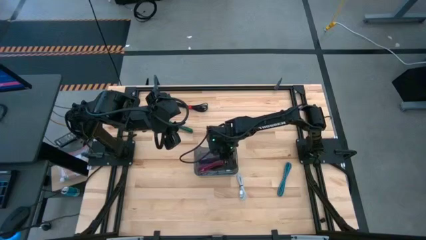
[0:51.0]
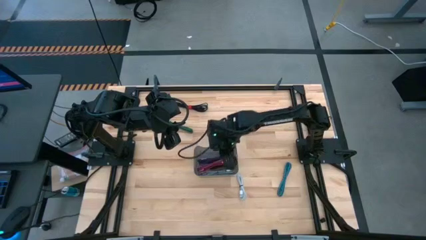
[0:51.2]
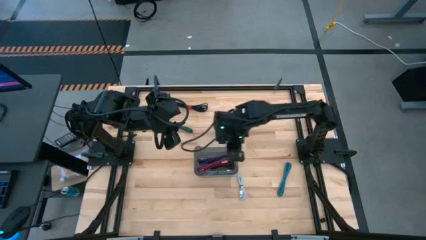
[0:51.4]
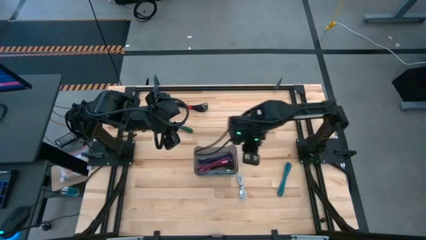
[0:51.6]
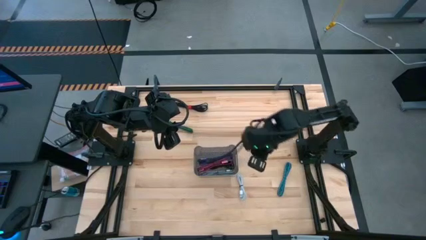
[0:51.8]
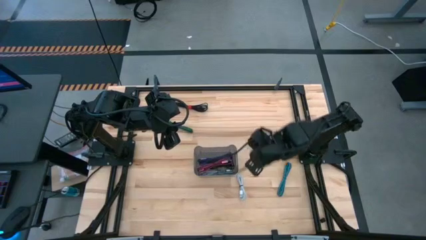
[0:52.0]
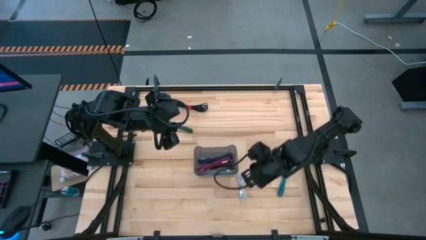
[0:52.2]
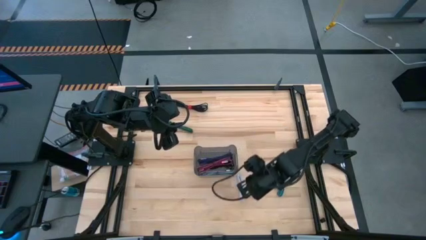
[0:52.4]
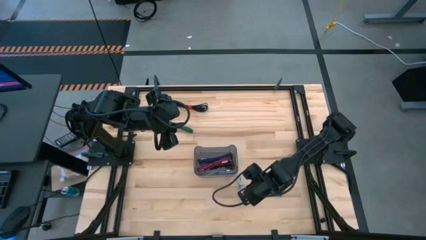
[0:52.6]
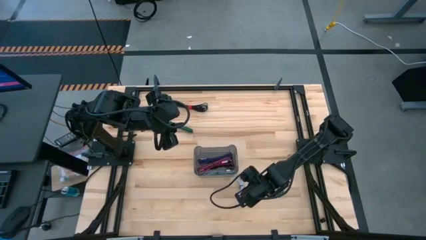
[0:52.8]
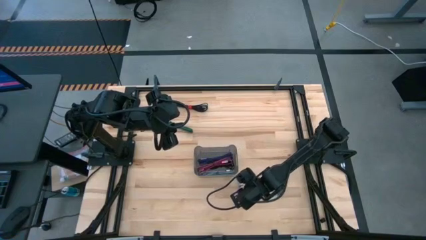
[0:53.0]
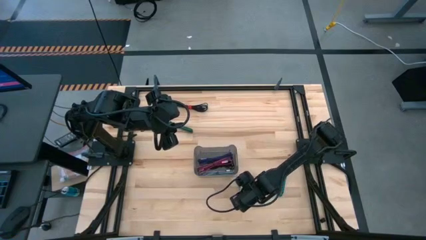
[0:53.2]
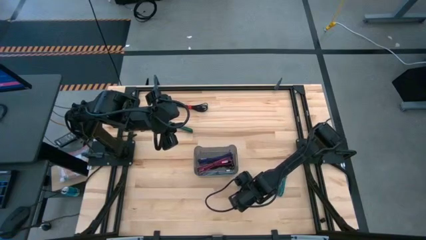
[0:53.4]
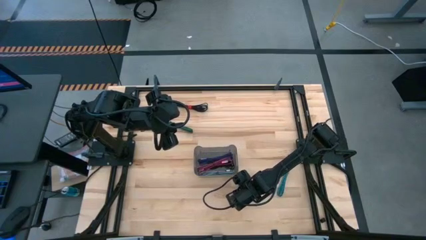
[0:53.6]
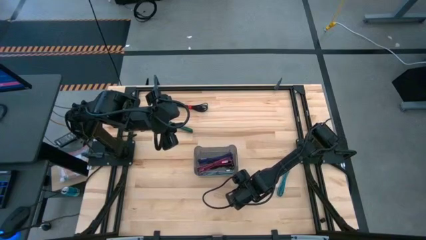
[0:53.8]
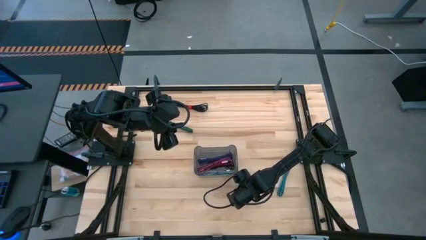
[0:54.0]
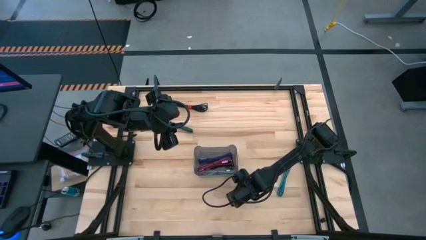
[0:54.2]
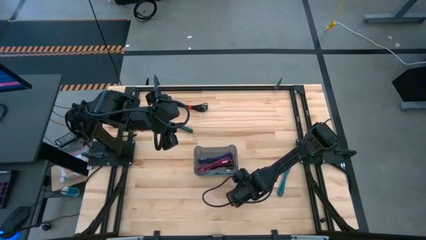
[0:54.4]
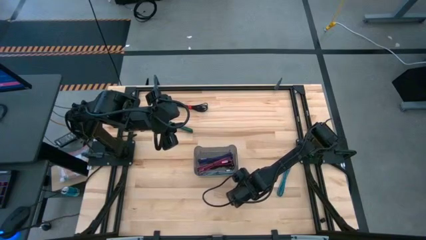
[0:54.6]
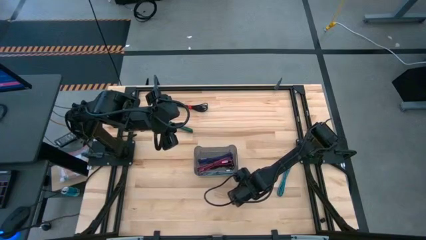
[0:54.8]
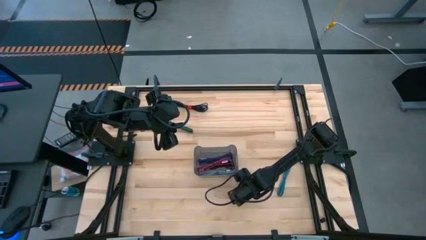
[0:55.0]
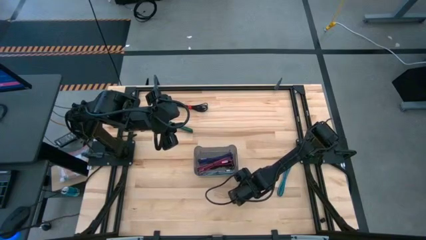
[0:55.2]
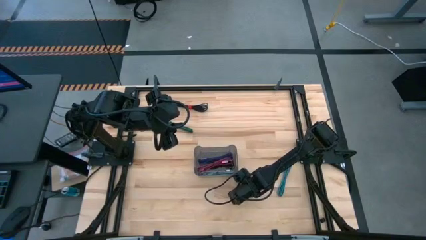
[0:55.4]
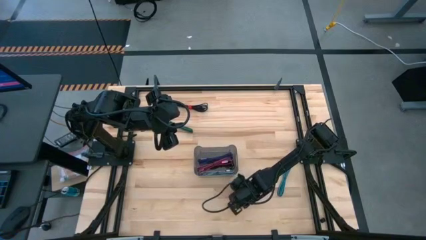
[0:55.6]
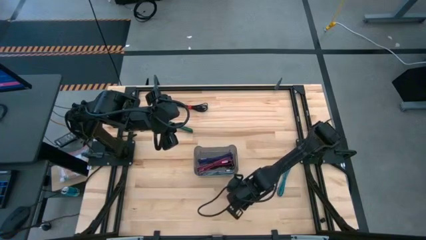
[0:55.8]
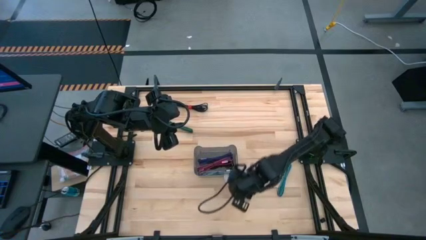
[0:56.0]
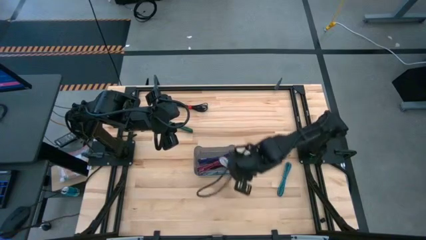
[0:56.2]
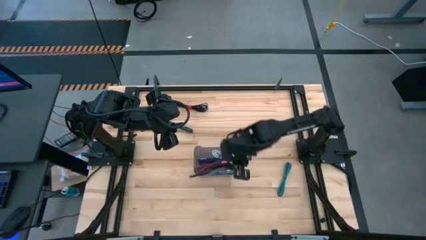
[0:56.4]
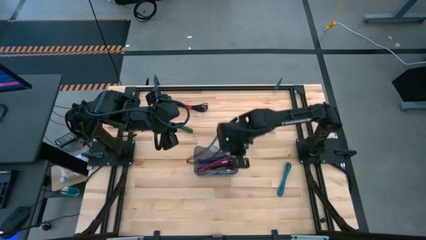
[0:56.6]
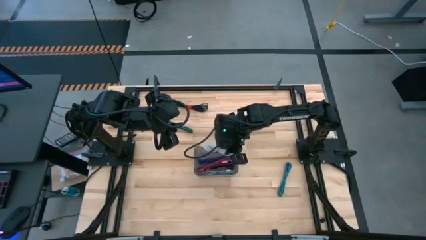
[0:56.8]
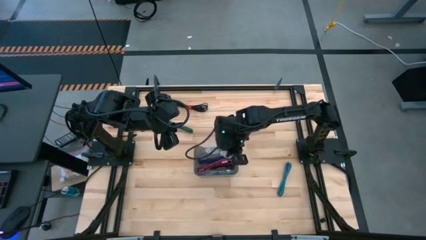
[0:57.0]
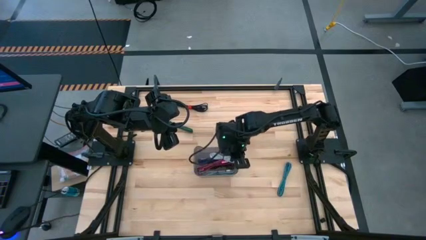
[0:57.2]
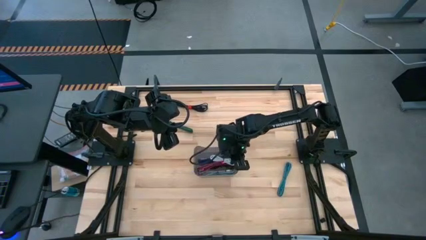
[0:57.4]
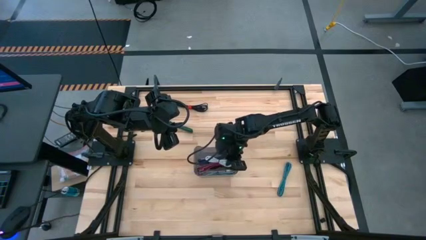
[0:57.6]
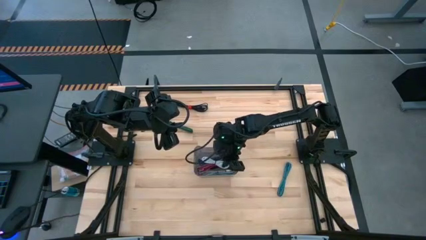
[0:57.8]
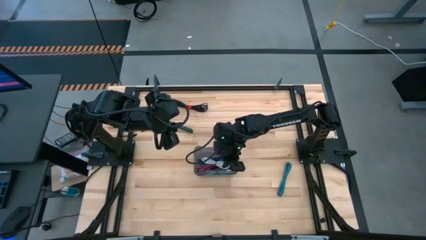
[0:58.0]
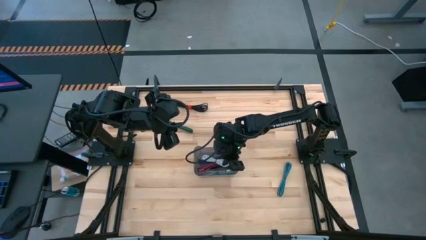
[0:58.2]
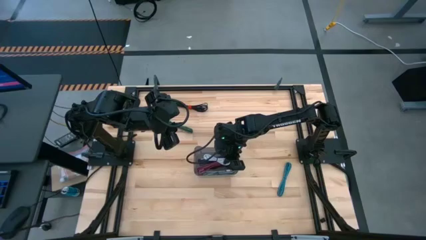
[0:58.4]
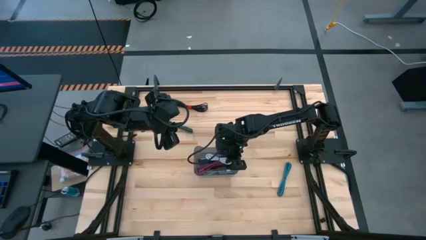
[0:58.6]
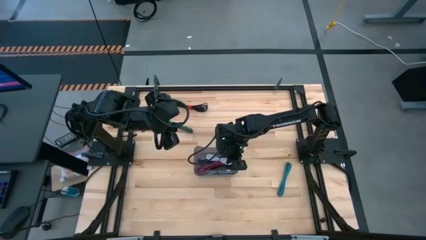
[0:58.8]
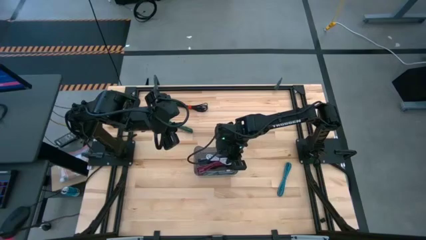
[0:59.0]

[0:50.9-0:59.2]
Task: Pick and place USB-C Cables
Put the white charger cable into the black bin

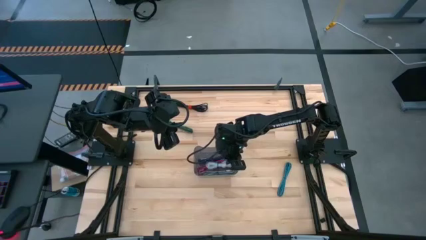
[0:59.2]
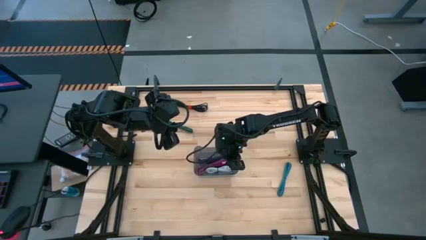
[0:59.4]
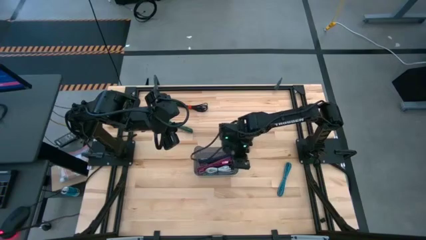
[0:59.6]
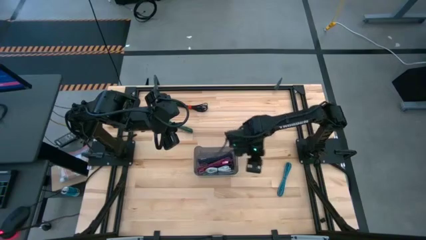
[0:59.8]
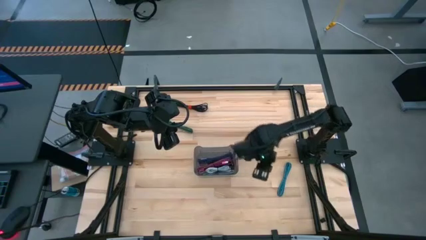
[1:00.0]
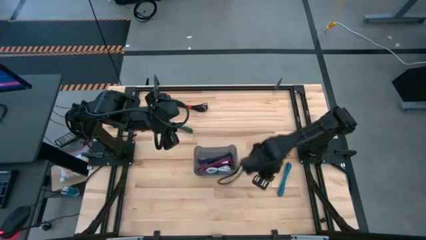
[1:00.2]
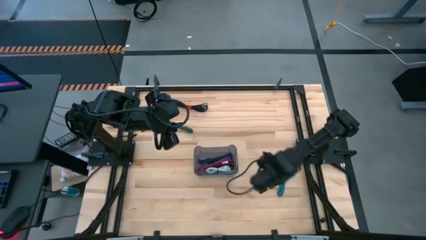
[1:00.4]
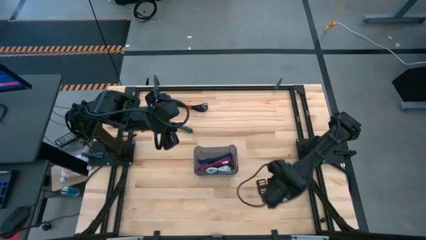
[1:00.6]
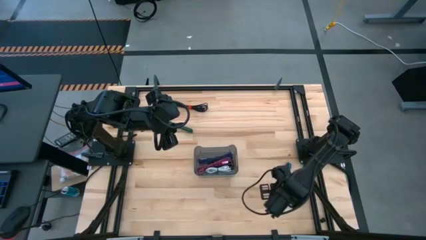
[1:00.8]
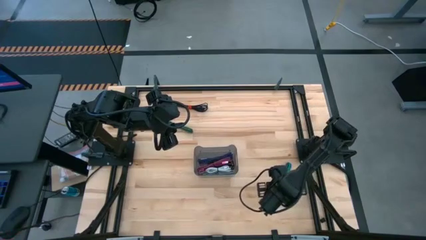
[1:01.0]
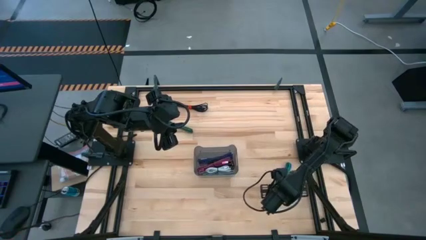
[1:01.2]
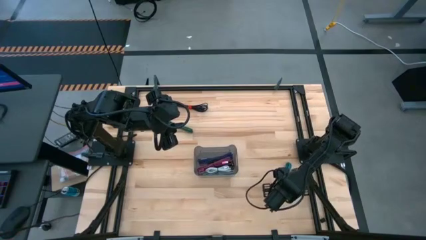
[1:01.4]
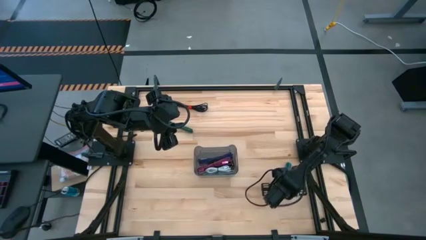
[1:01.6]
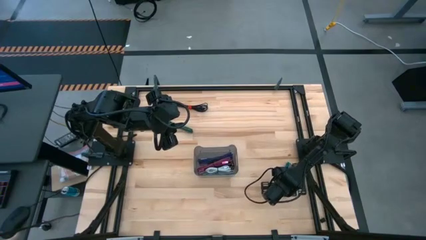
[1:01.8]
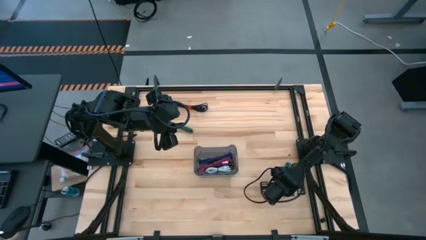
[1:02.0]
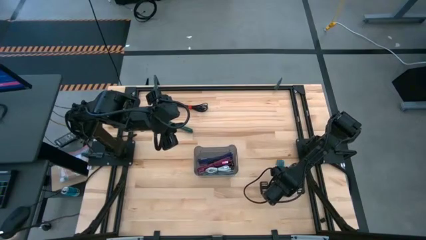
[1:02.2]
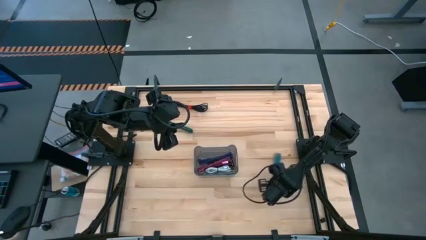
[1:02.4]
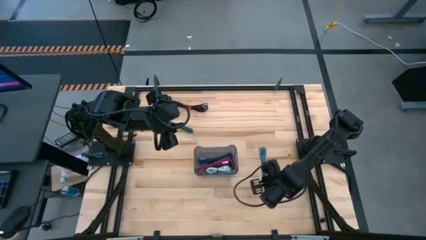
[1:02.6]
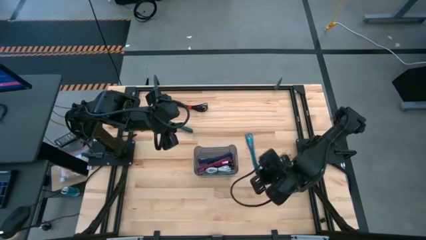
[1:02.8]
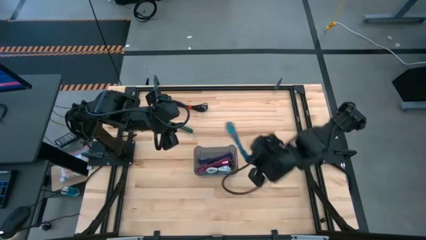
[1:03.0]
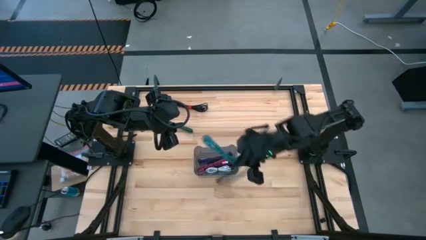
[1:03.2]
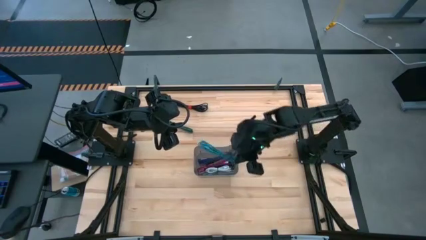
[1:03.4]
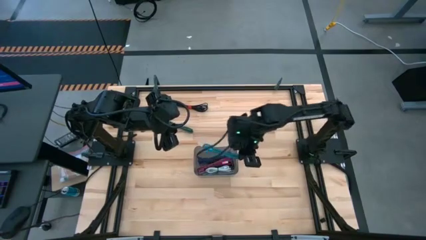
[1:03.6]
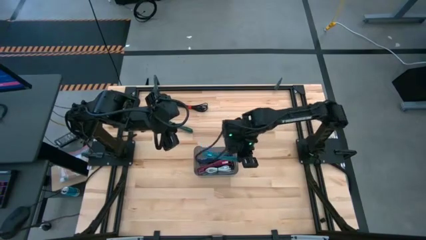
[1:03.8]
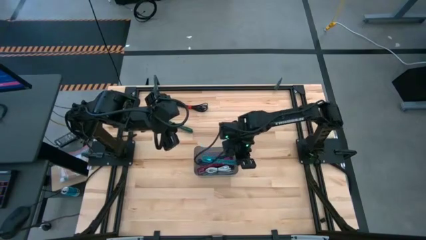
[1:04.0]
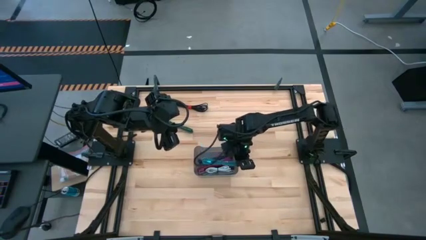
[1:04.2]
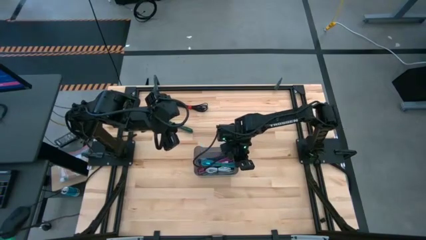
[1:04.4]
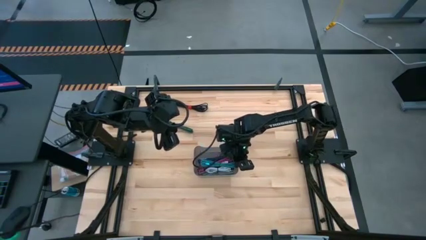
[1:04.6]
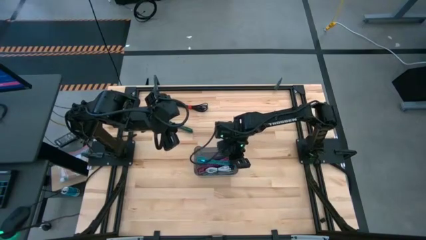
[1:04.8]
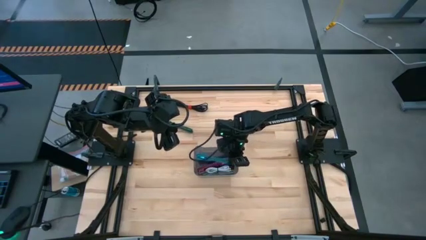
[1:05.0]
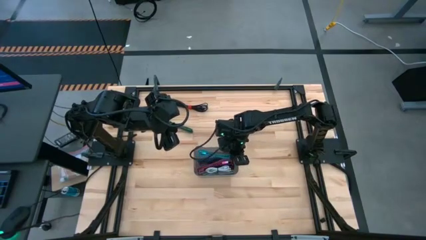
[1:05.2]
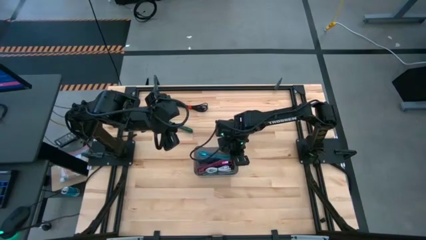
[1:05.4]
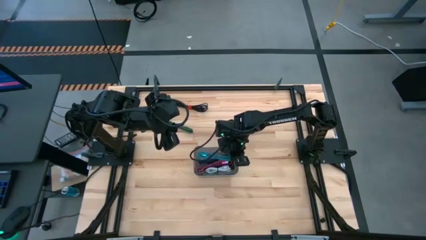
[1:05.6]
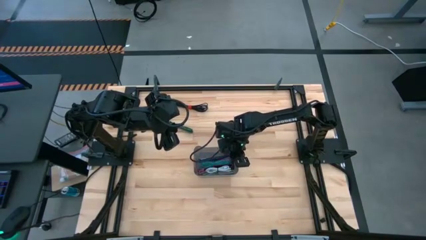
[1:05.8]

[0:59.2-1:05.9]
Put the blue charger cable into the black bin

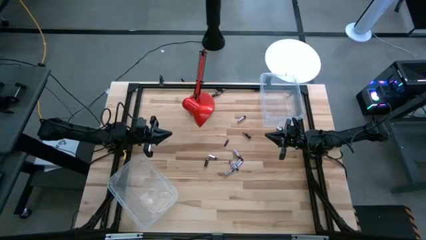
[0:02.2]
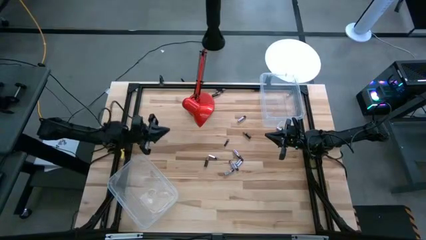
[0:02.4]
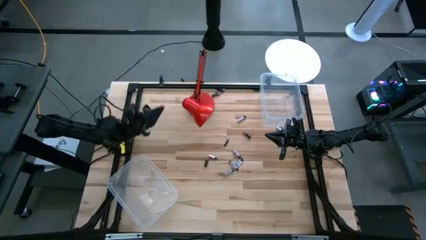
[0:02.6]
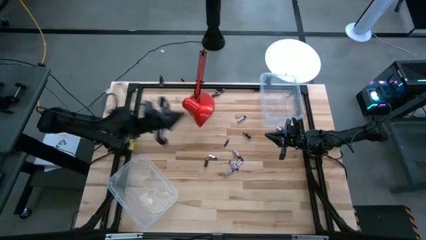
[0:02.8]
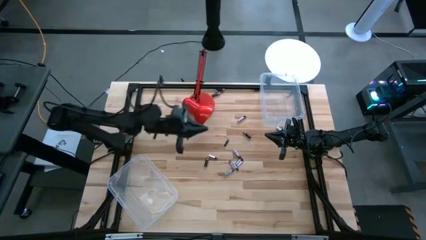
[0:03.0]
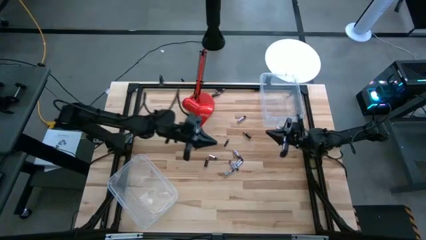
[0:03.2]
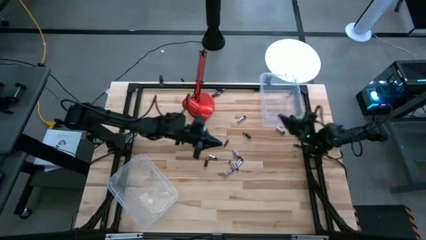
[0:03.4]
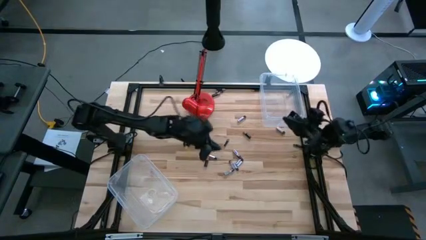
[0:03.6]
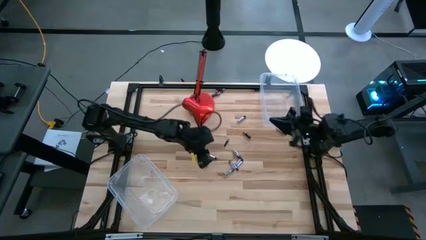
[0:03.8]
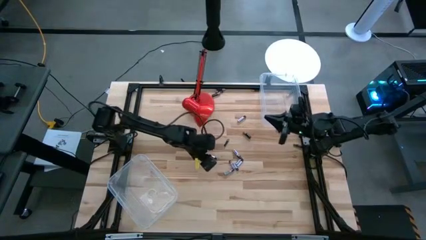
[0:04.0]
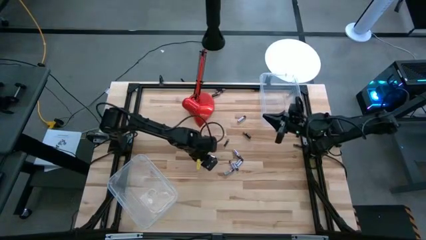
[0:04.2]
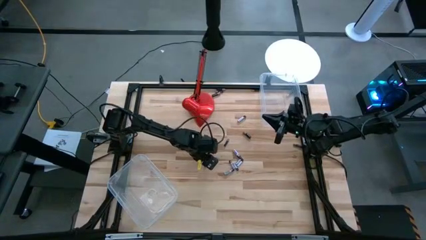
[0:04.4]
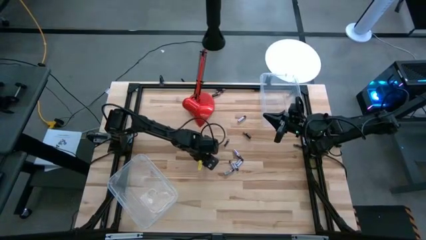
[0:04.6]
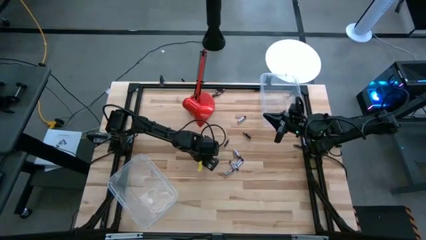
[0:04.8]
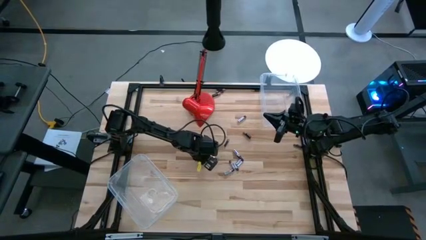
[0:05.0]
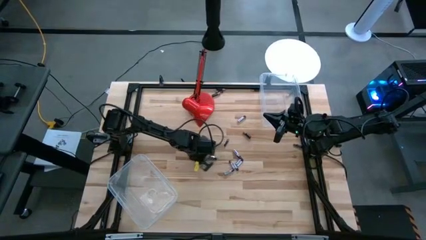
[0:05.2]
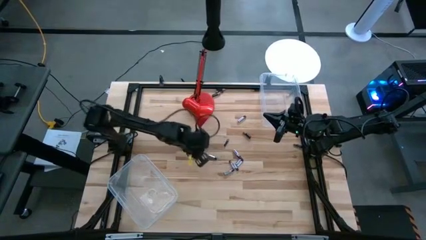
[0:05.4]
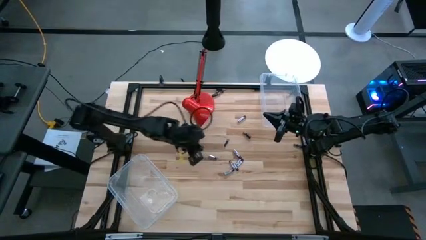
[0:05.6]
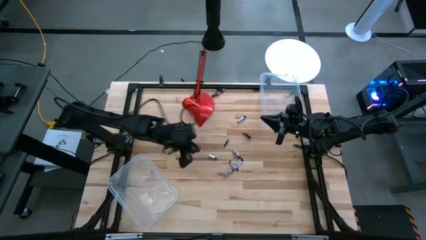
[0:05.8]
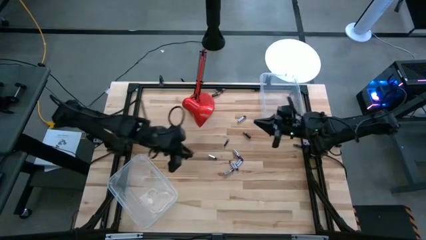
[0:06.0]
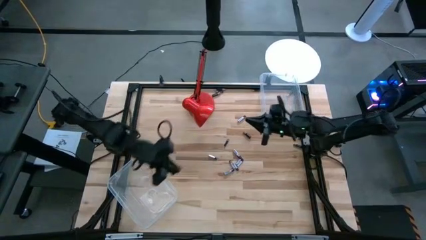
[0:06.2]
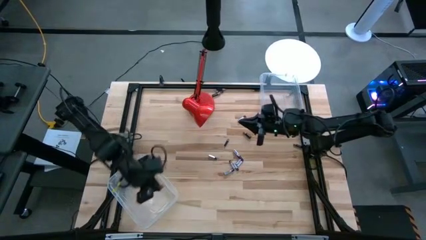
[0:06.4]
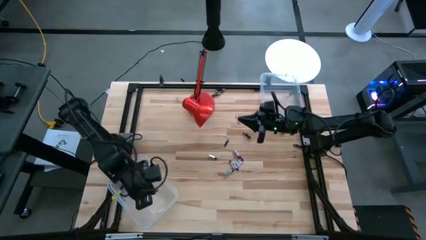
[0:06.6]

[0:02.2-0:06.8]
Task: Sort batteries
Put the black battery into the bottom transparent bin
